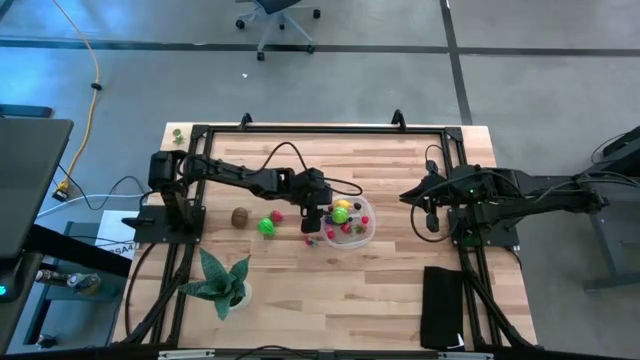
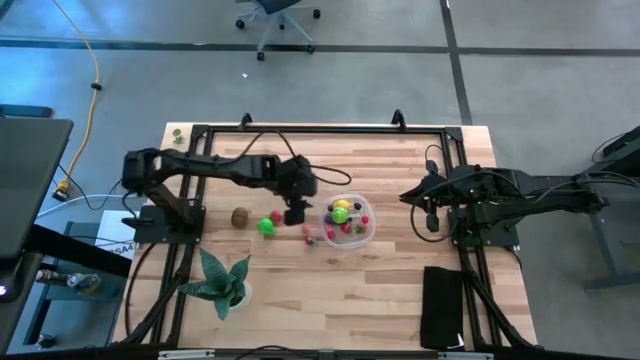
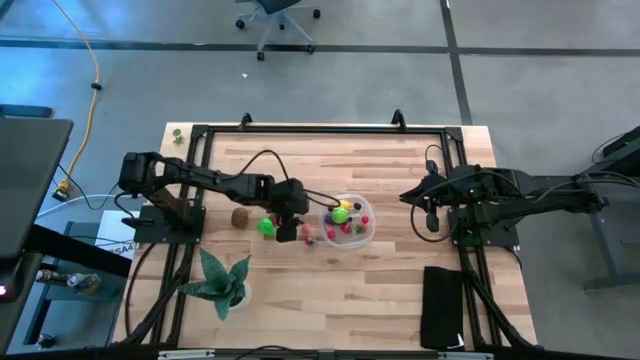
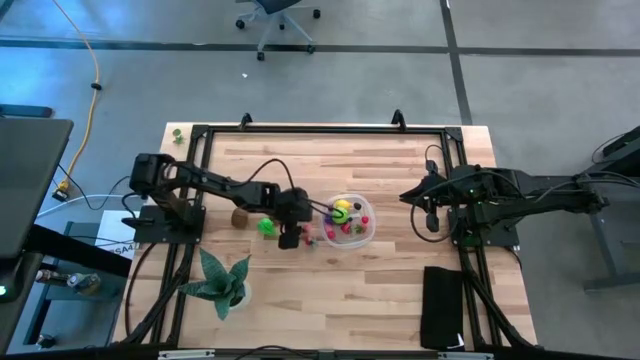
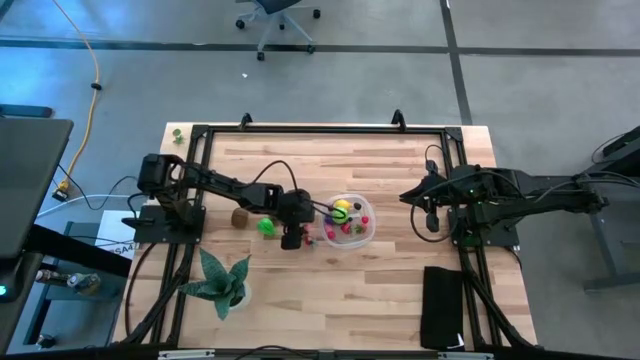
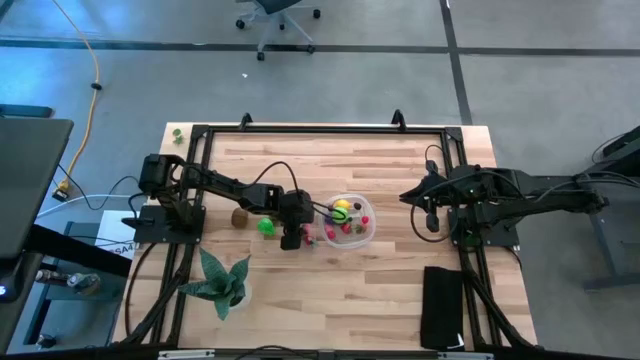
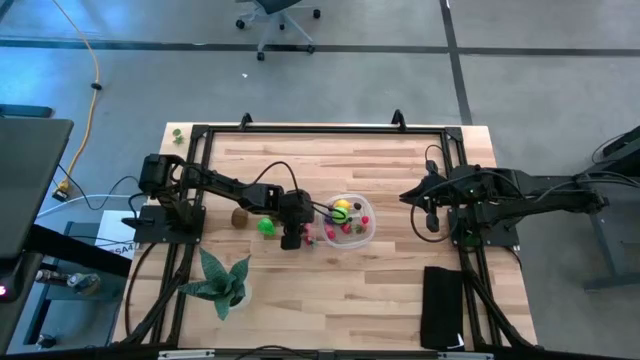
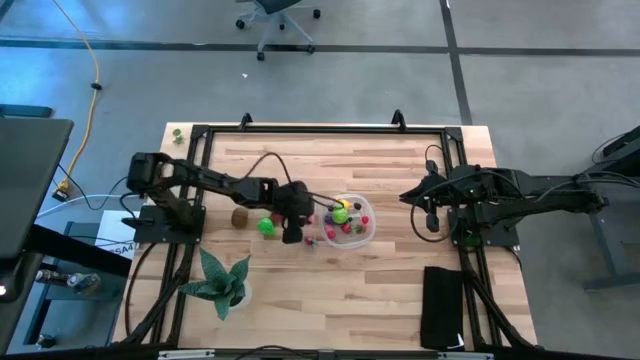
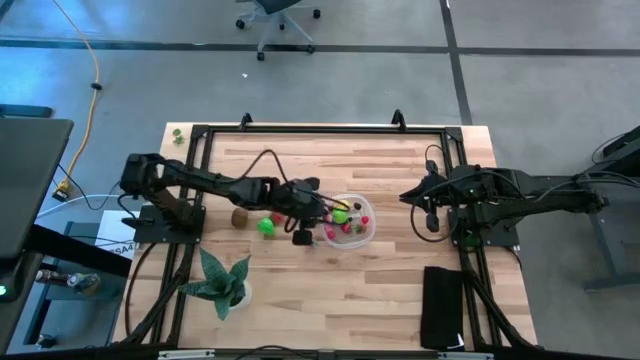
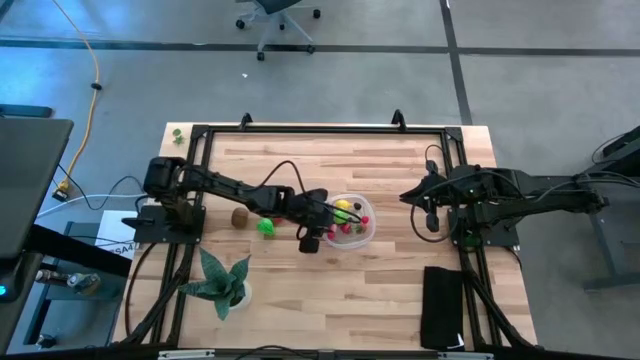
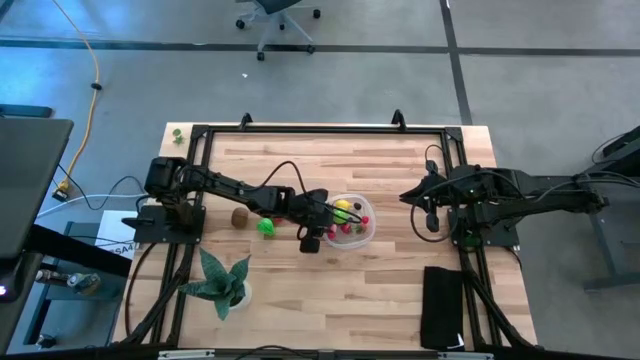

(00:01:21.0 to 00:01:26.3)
Task: Pick and placing Produce into tupperware
Put the pink peach into the transparent container

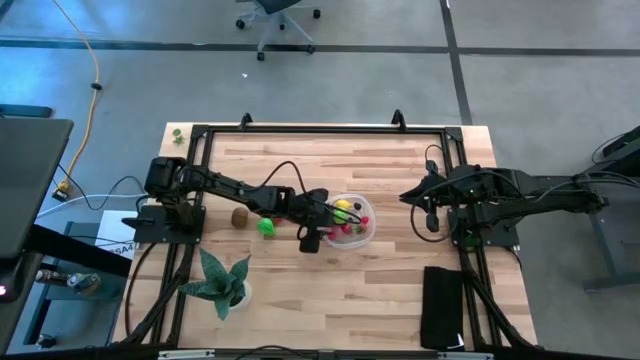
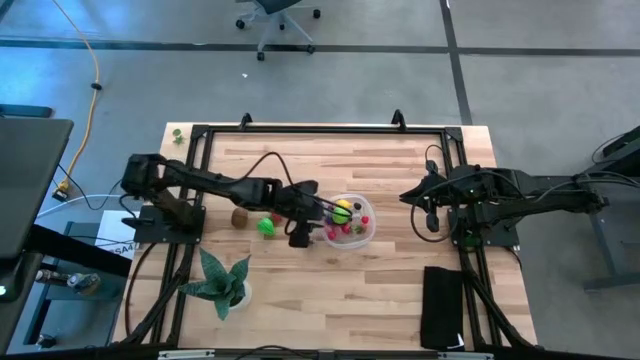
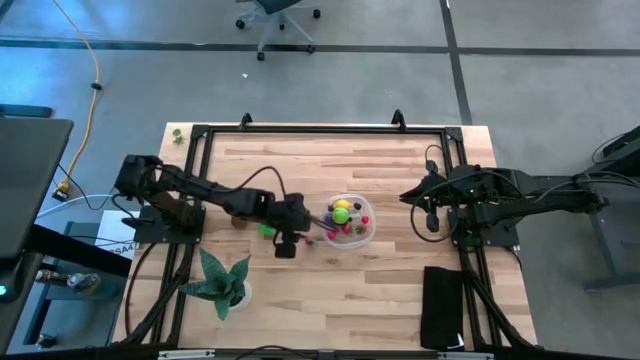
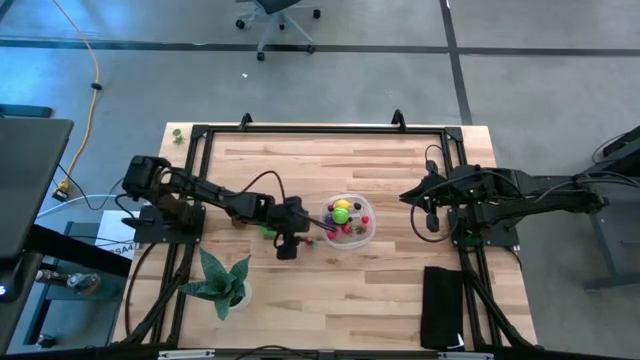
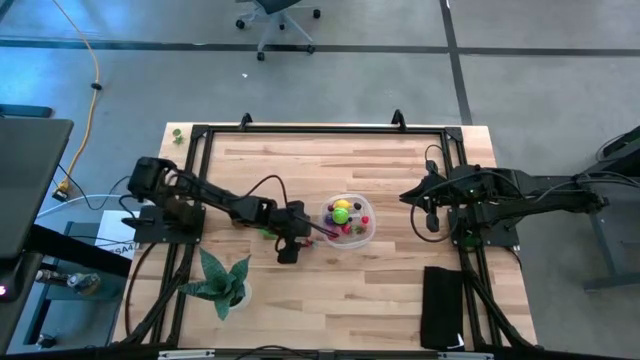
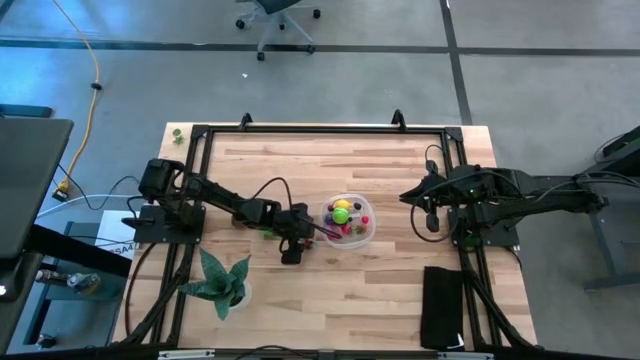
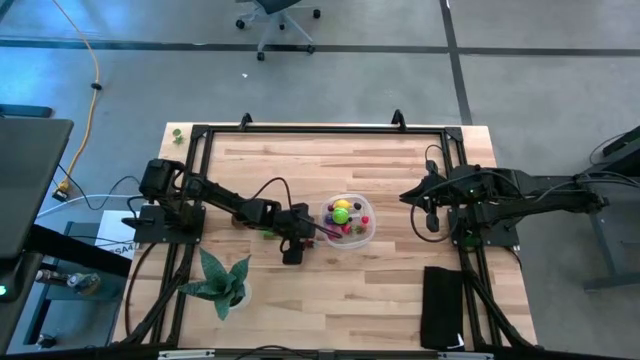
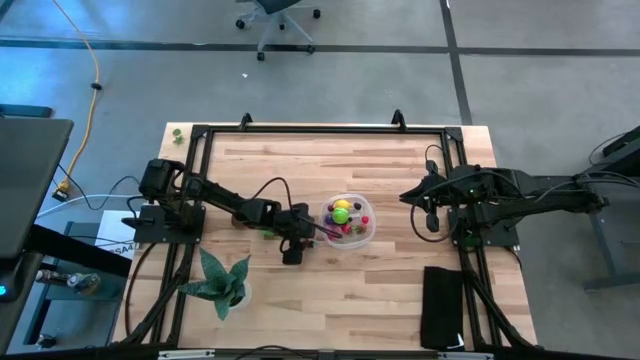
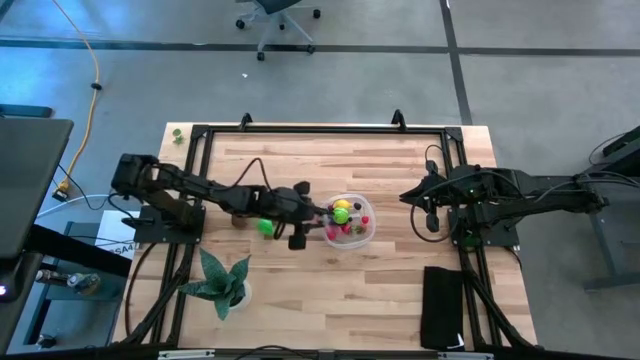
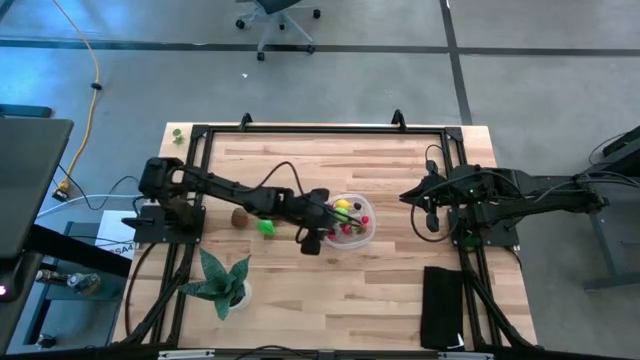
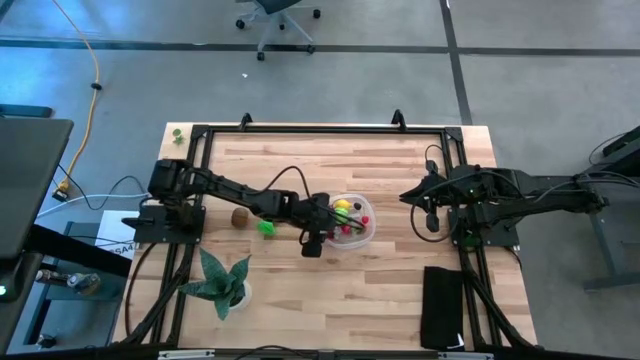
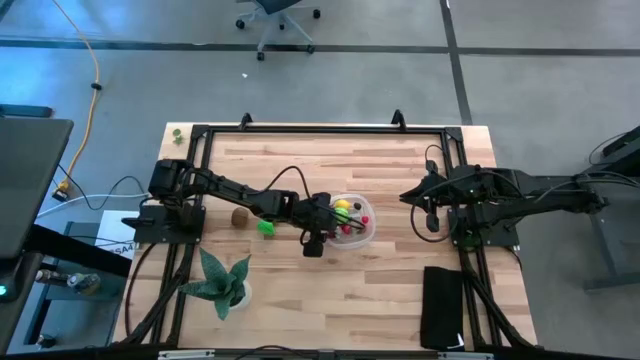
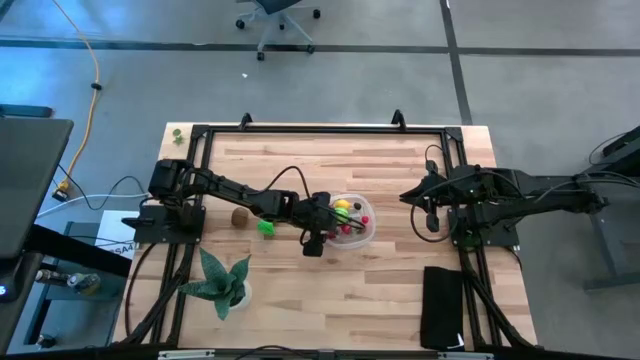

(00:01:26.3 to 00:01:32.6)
Put the red strawberry into the transparent container

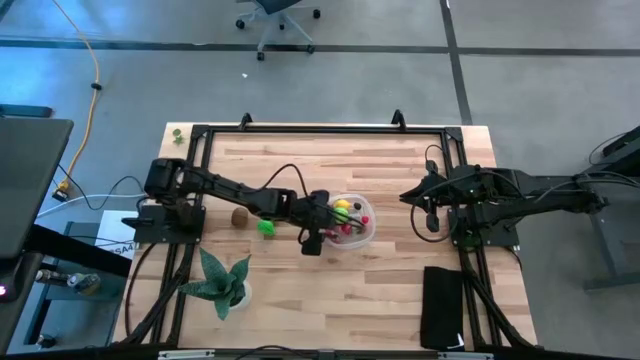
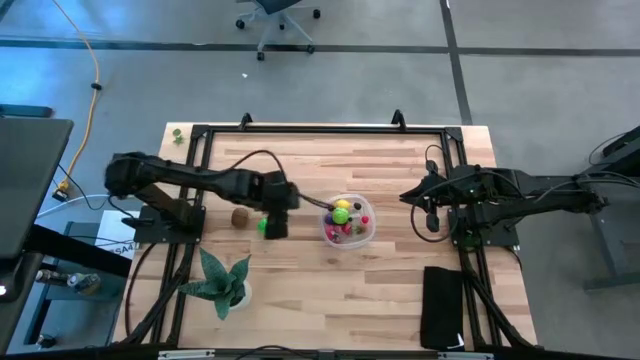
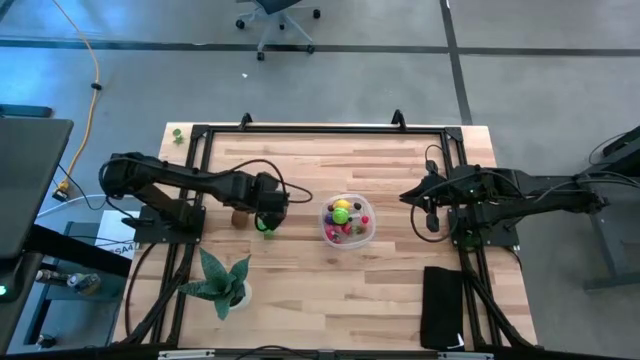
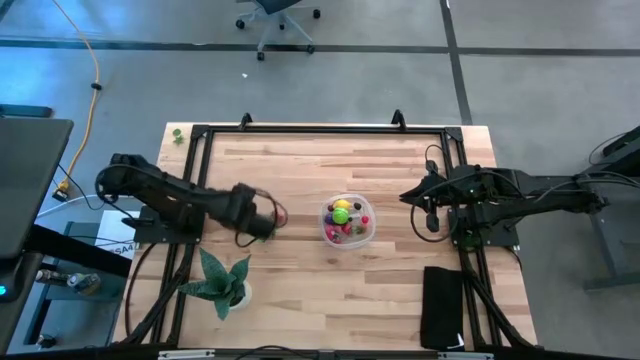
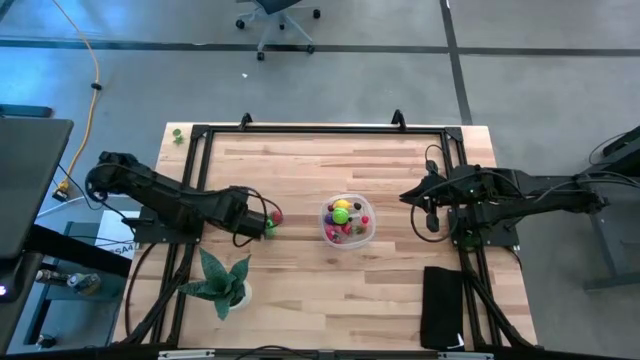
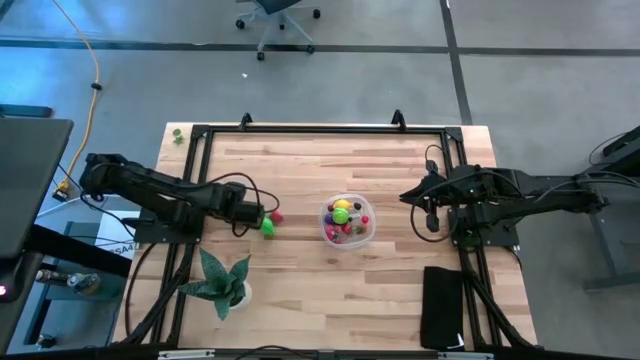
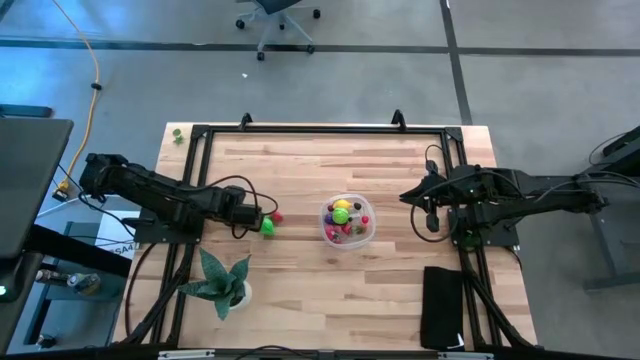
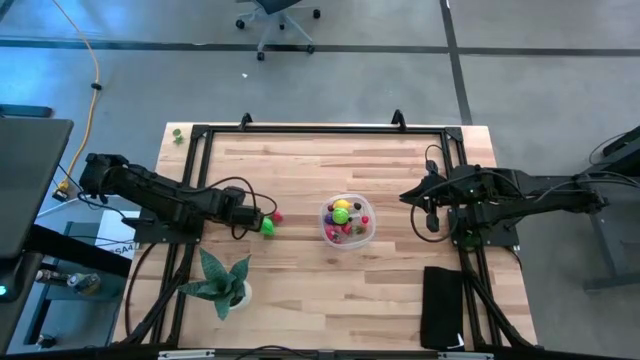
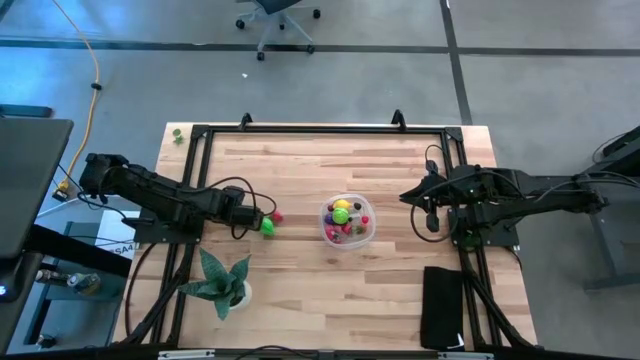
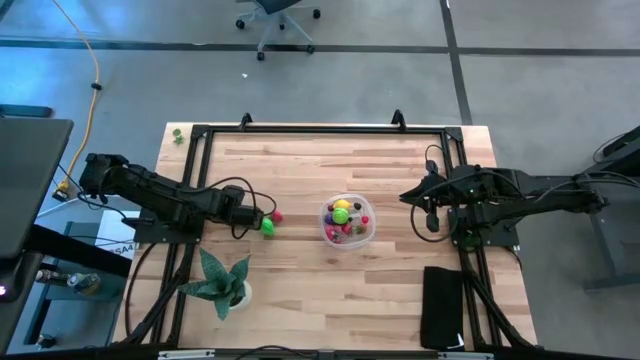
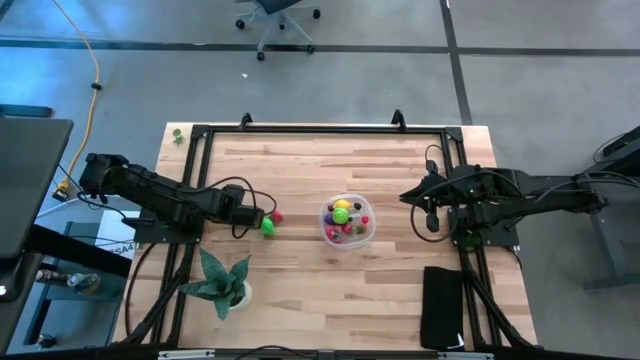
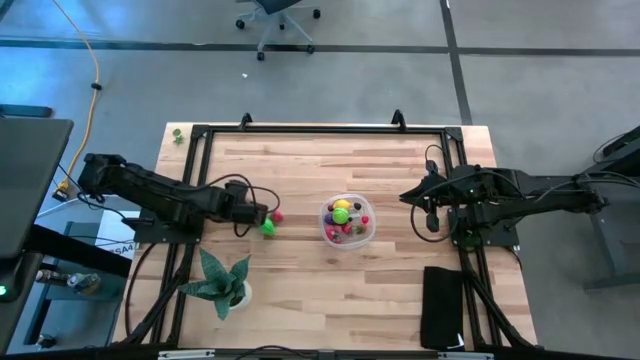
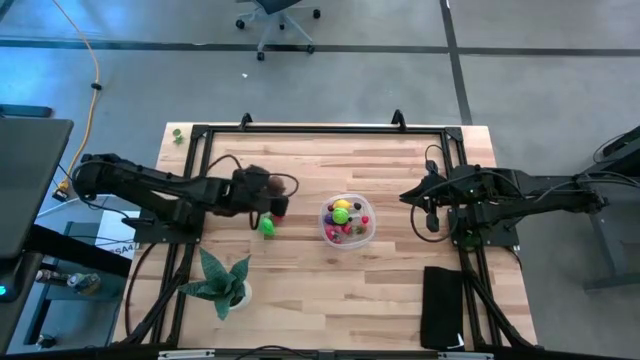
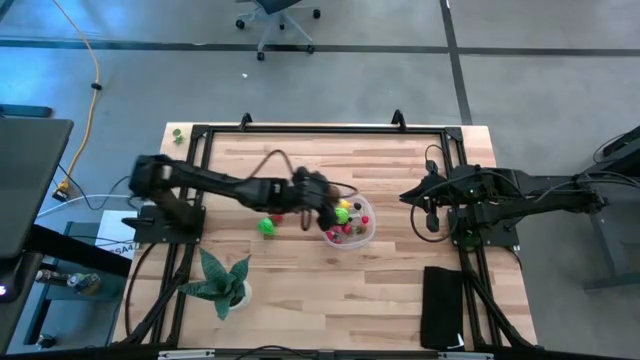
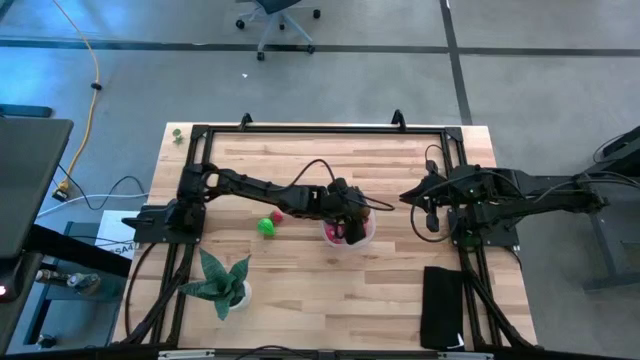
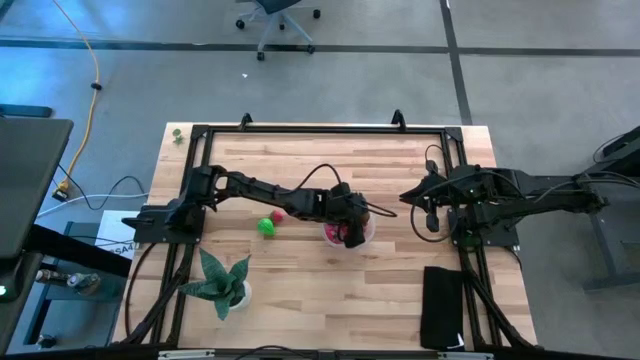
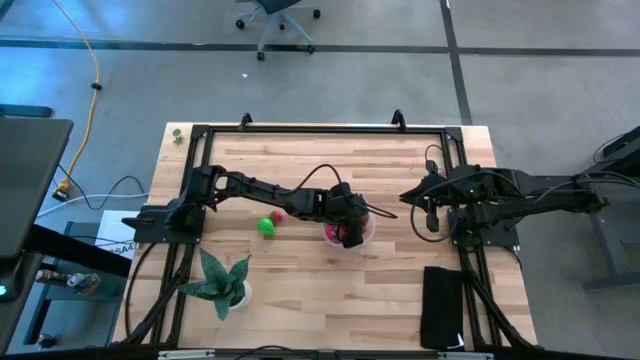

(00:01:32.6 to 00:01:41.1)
Put the brown kiwi into the transparent container
